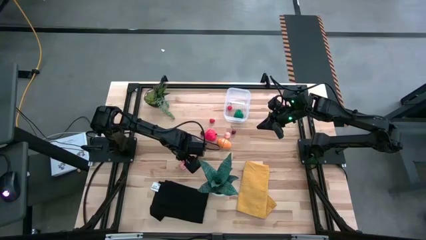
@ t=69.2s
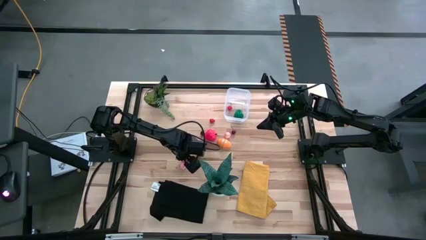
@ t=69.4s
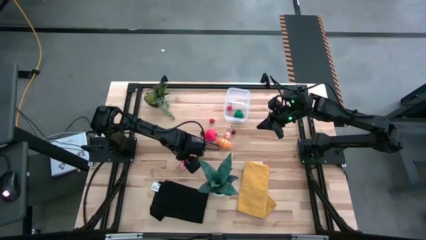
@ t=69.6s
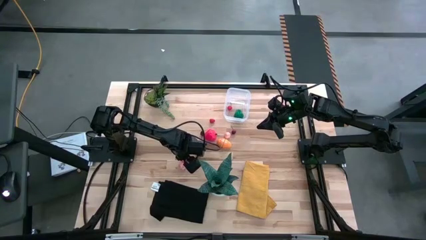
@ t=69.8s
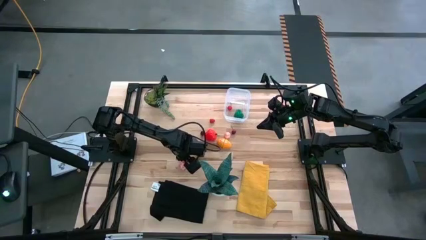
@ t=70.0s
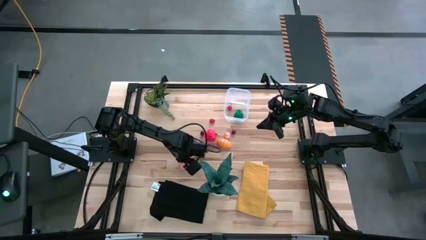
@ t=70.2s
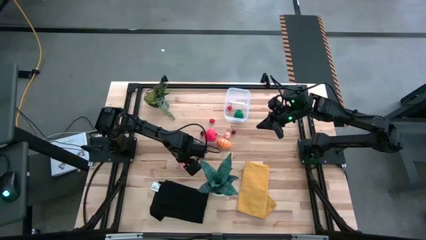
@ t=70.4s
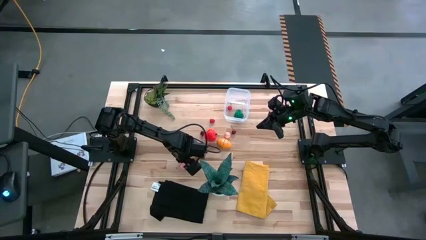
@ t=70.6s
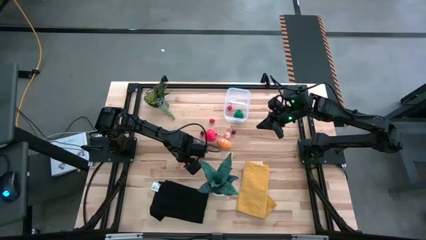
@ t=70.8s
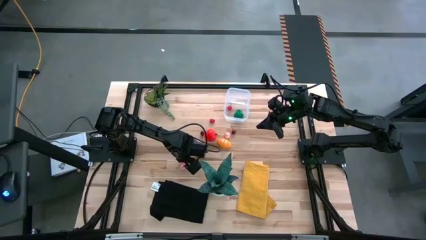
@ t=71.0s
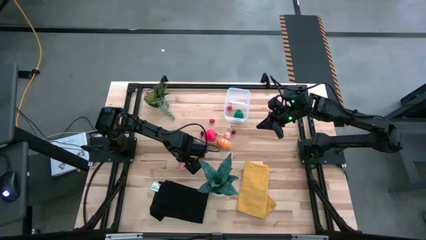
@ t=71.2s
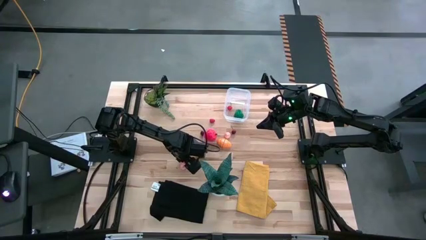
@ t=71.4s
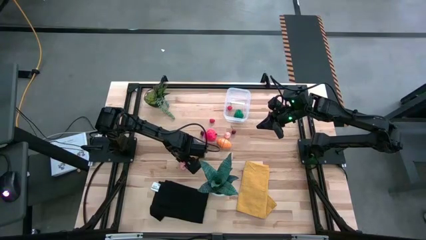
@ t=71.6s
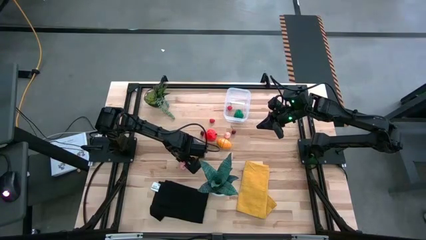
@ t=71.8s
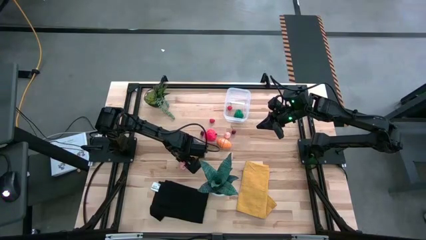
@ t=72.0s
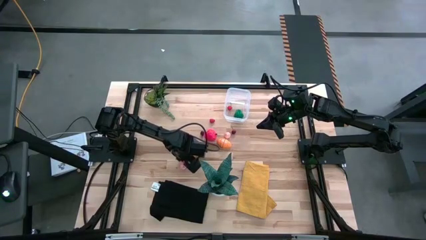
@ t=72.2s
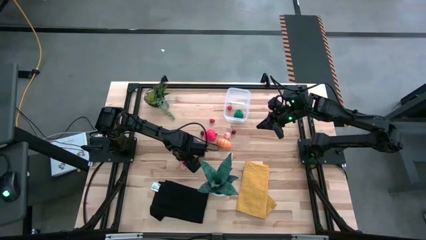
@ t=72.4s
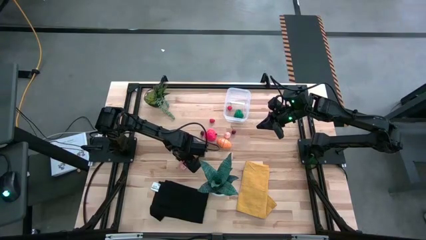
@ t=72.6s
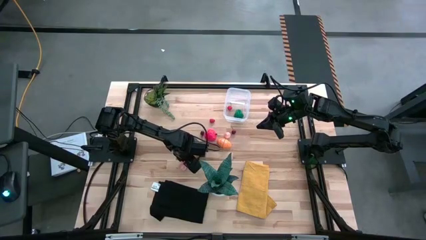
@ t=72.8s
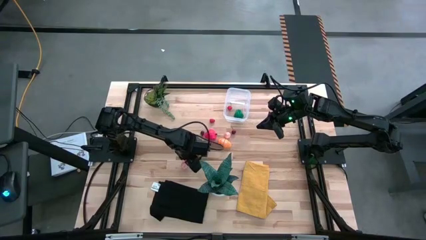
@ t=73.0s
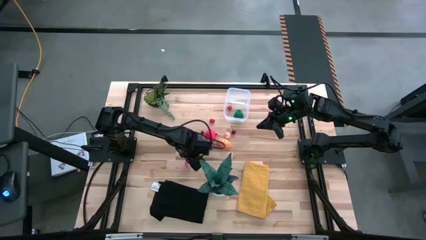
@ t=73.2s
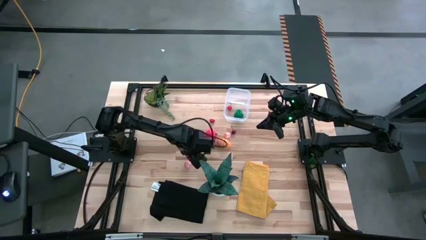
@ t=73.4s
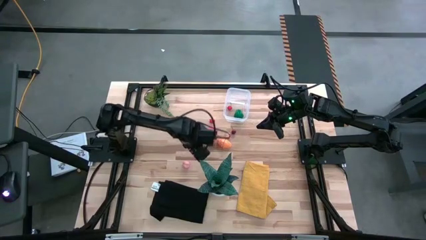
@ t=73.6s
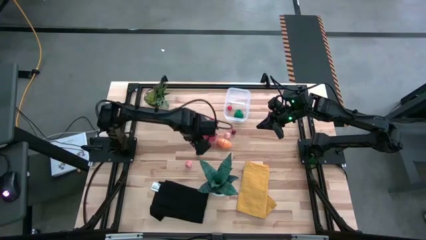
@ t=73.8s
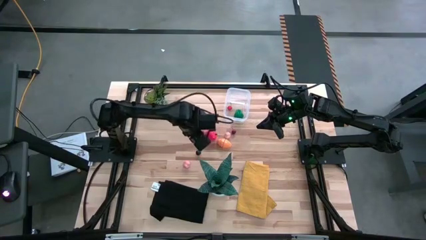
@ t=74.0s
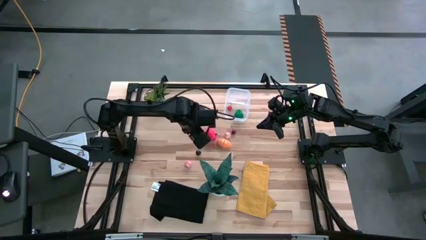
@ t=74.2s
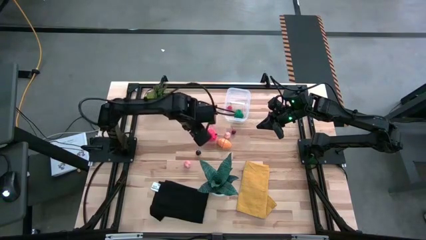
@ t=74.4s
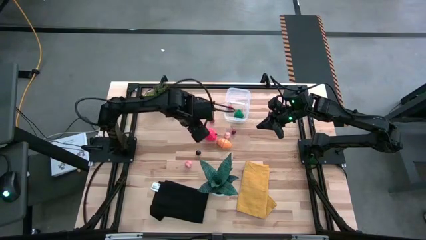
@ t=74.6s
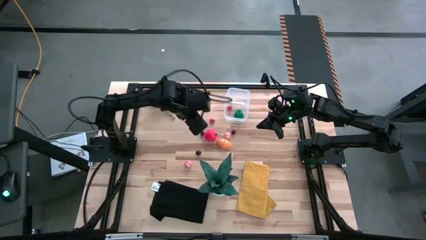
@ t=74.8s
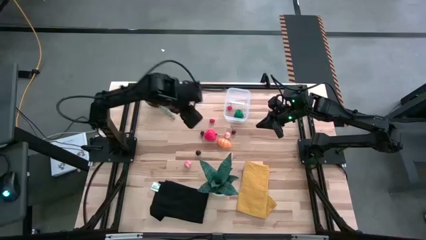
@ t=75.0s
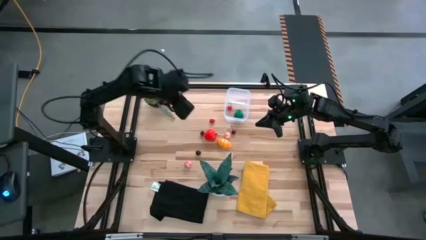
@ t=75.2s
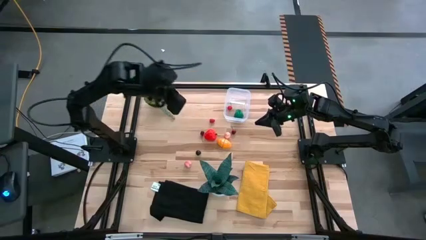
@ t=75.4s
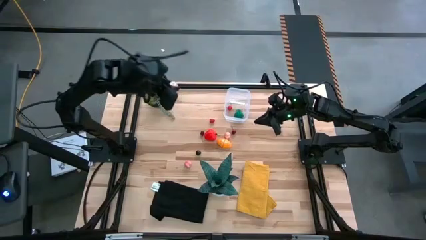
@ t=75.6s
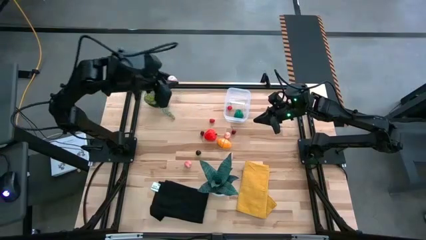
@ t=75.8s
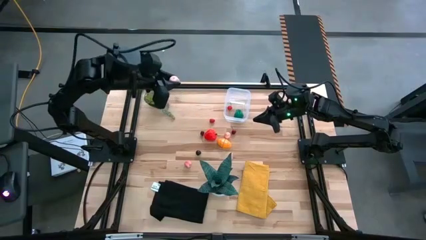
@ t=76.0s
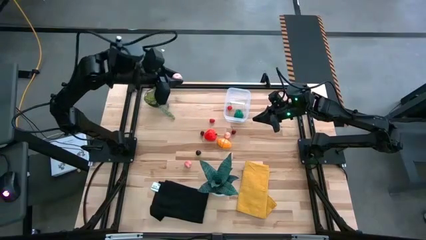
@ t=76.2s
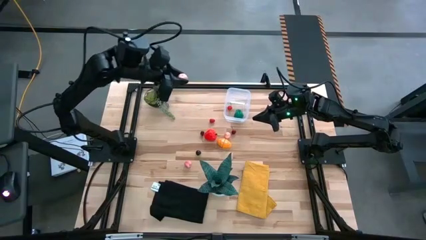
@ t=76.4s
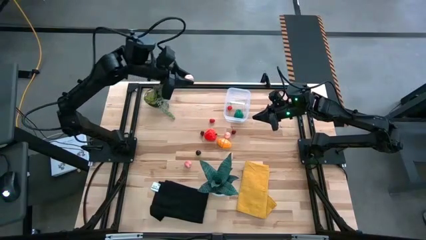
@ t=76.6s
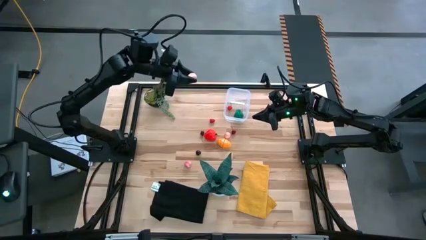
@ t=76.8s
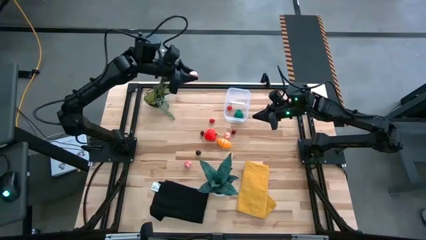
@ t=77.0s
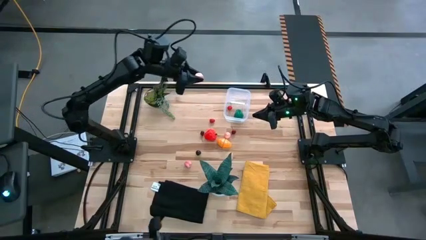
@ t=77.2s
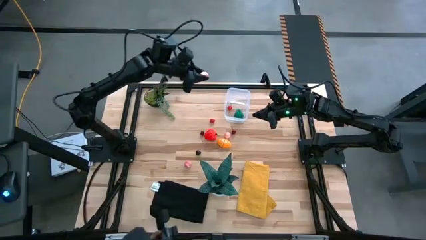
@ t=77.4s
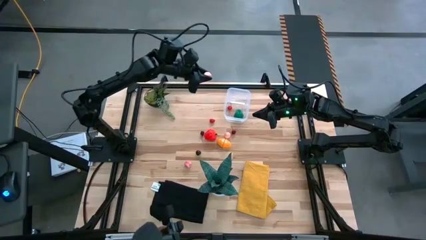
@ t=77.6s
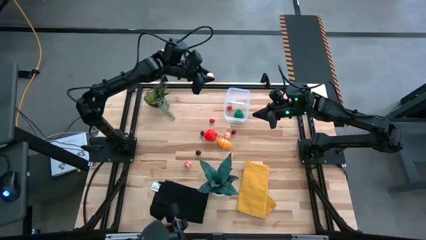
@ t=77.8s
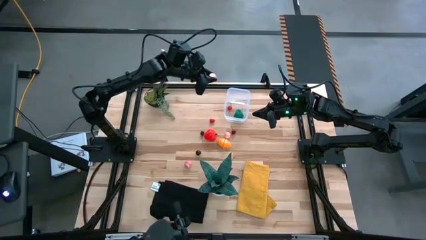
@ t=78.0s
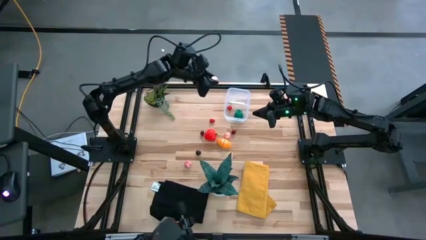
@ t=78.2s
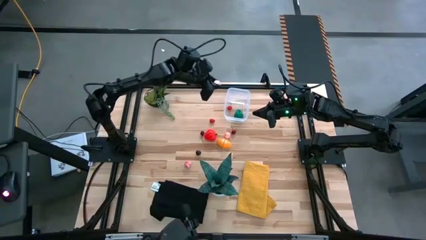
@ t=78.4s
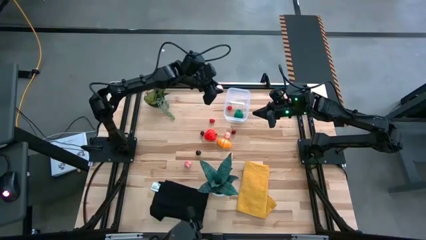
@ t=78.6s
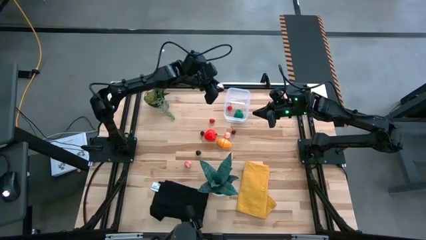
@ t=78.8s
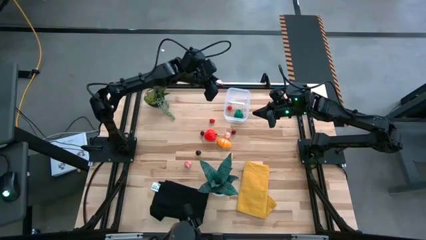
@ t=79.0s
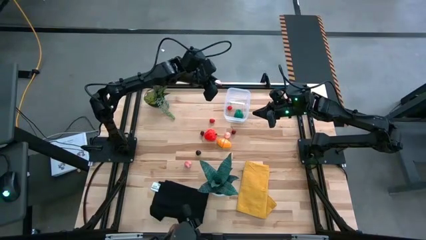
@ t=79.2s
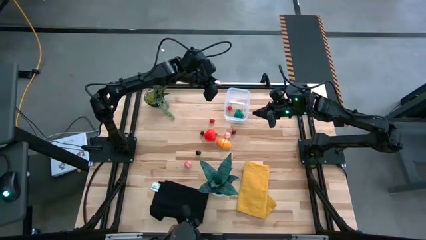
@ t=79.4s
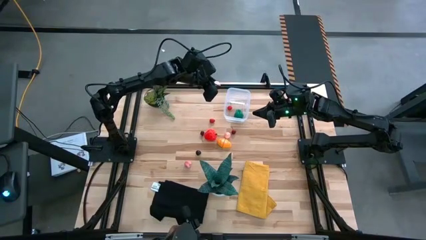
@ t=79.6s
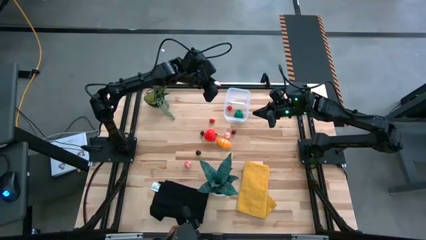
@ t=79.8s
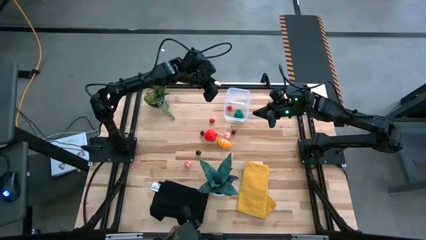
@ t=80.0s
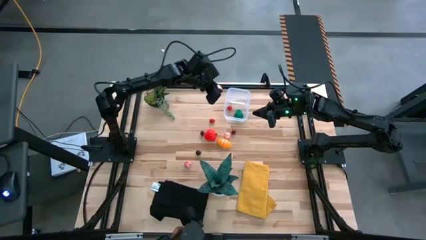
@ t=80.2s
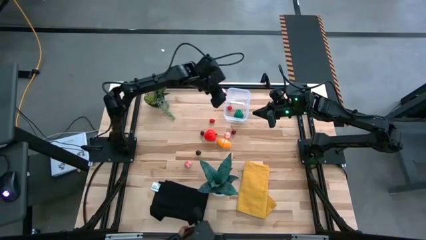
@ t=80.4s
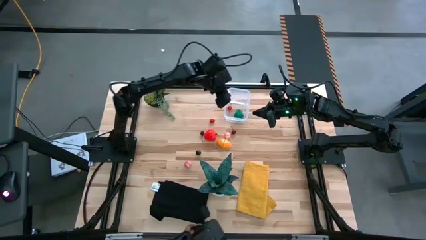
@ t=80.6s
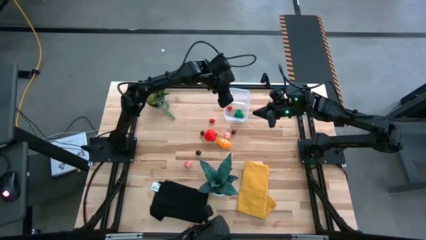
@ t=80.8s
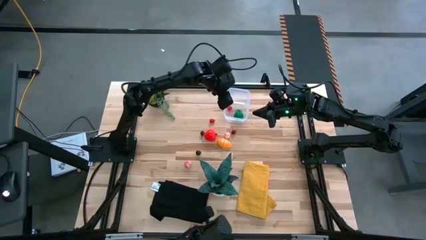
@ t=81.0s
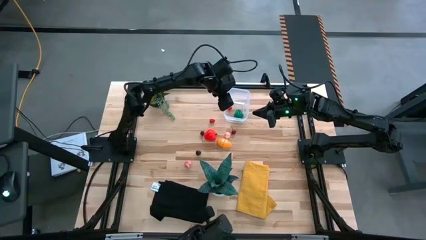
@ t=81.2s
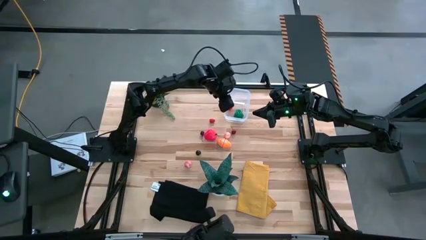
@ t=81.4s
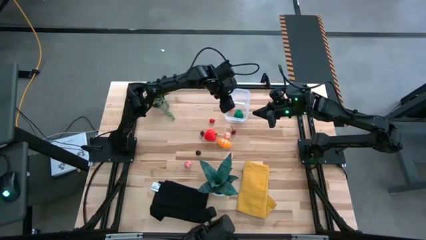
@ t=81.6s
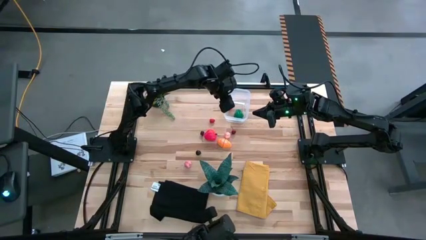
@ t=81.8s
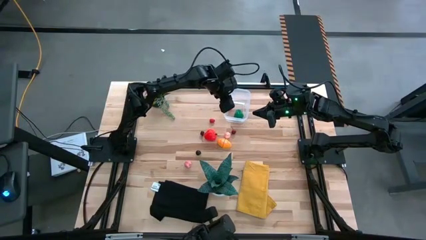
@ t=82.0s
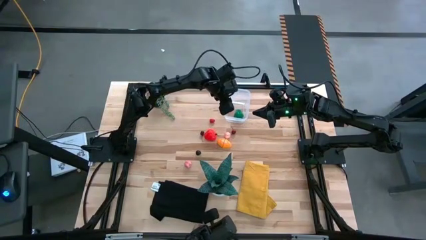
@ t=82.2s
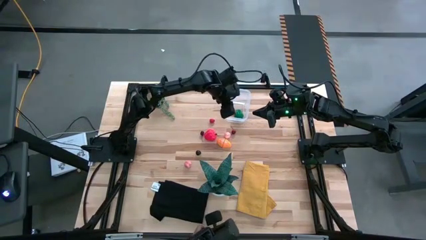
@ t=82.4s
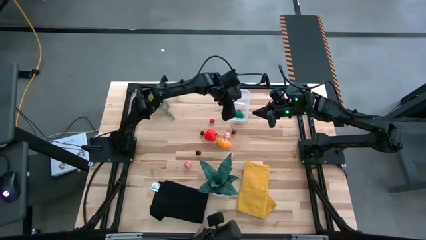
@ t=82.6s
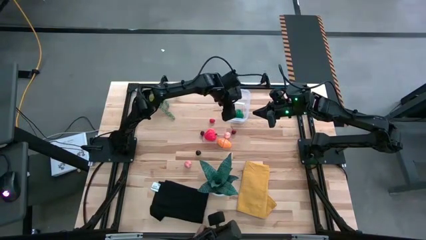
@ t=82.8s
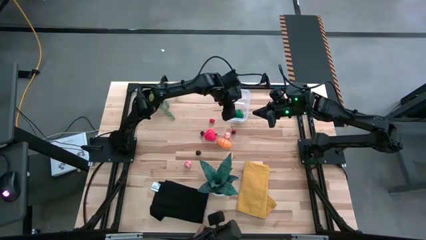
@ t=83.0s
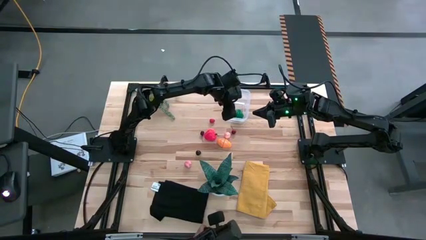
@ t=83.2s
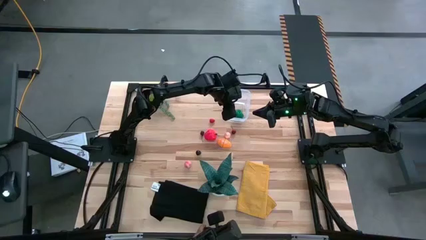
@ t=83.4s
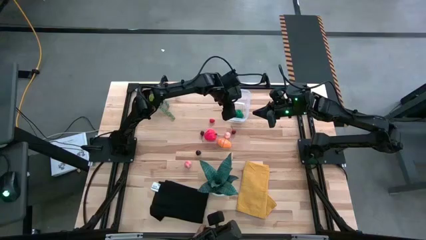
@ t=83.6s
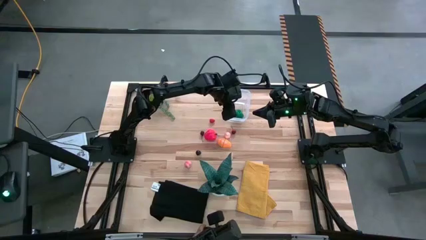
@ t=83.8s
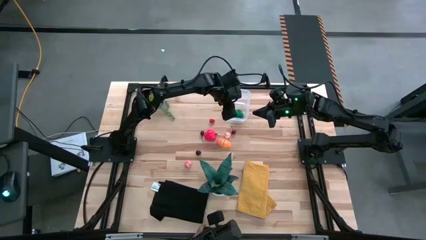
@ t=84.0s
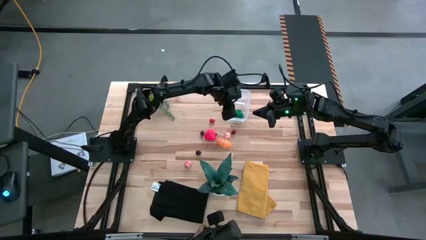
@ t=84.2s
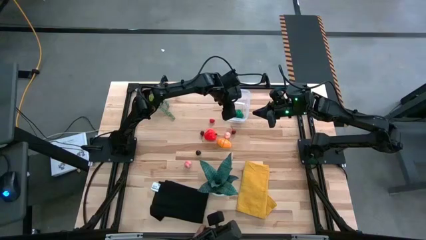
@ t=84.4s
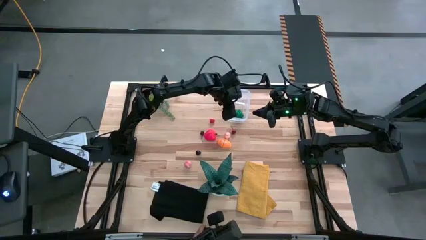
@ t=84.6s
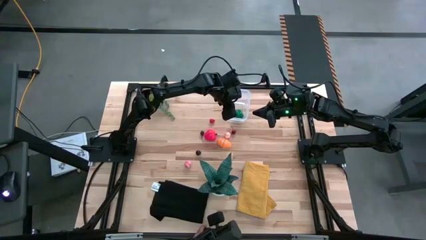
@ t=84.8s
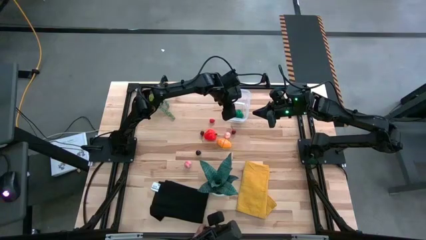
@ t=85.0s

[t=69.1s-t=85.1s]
Task: Pick and placing Produce into tupperware
Put the top left apricot into the transparent container
